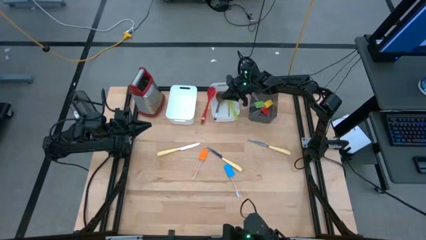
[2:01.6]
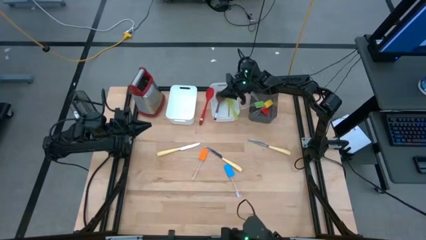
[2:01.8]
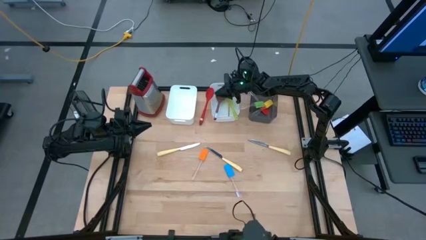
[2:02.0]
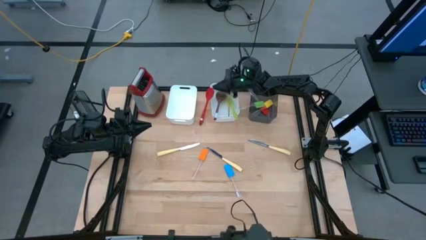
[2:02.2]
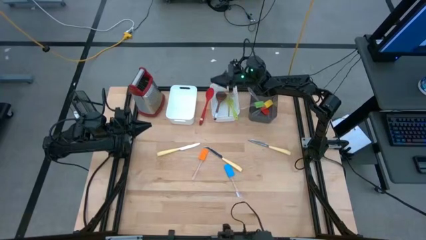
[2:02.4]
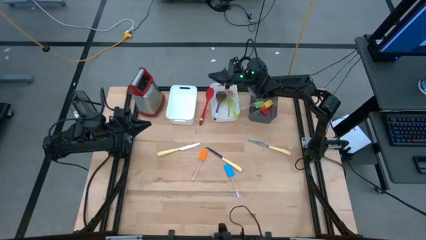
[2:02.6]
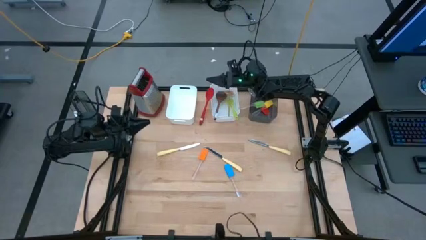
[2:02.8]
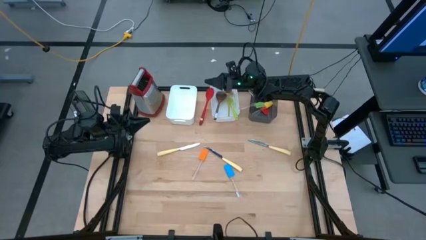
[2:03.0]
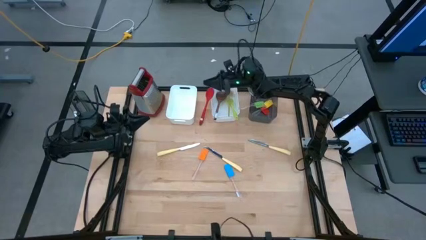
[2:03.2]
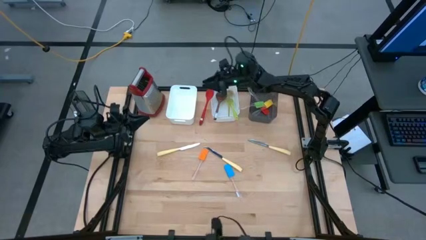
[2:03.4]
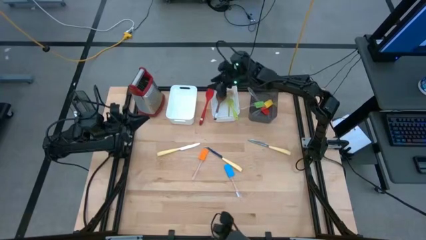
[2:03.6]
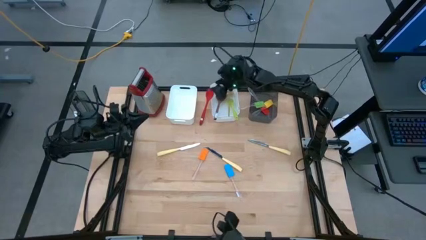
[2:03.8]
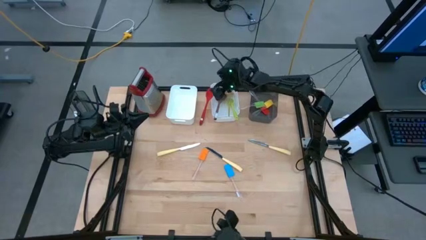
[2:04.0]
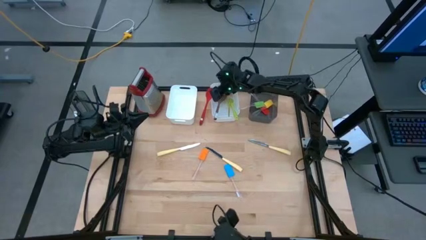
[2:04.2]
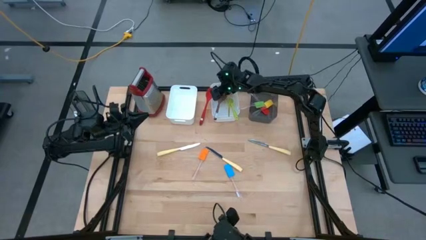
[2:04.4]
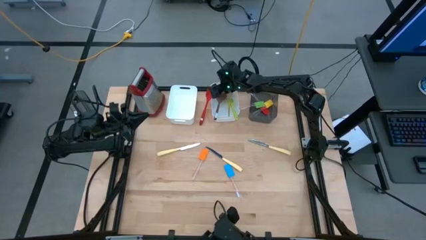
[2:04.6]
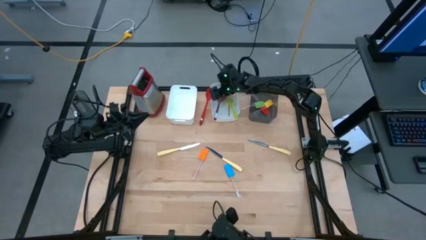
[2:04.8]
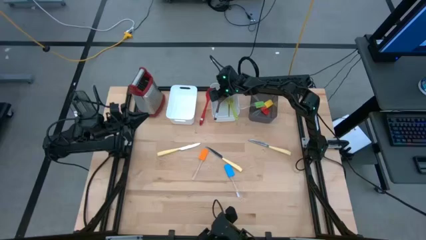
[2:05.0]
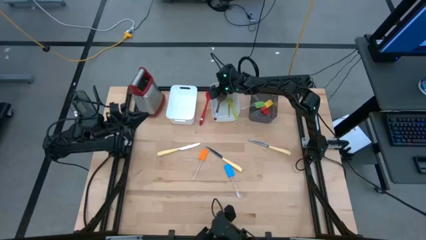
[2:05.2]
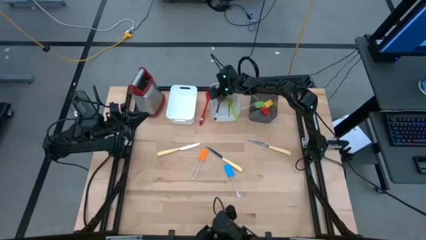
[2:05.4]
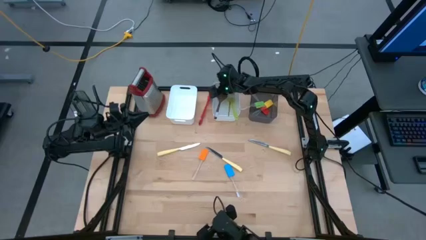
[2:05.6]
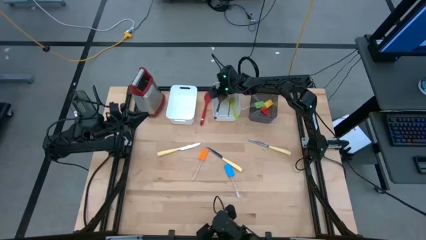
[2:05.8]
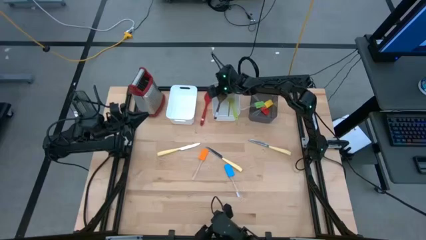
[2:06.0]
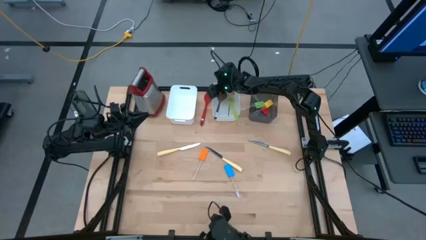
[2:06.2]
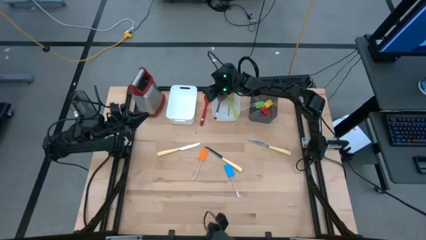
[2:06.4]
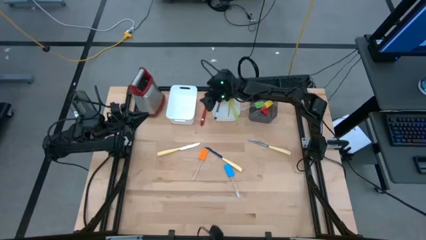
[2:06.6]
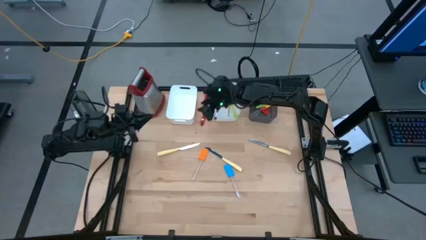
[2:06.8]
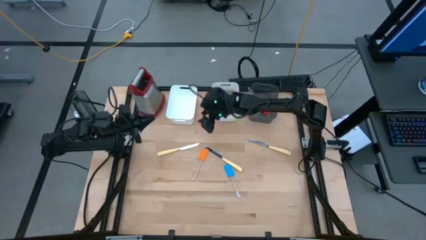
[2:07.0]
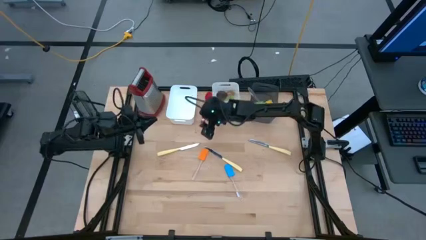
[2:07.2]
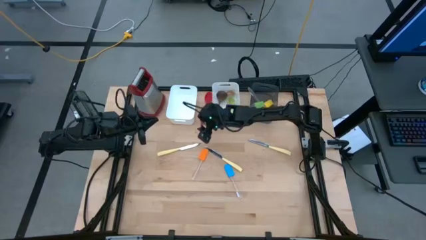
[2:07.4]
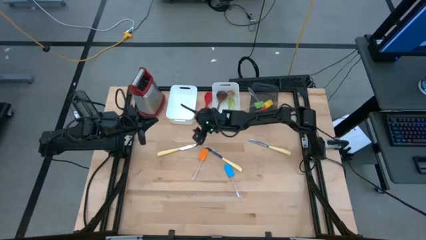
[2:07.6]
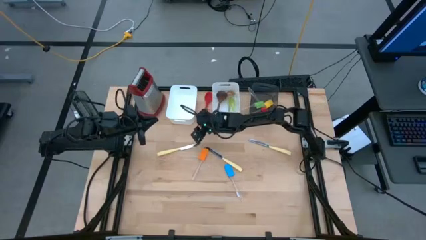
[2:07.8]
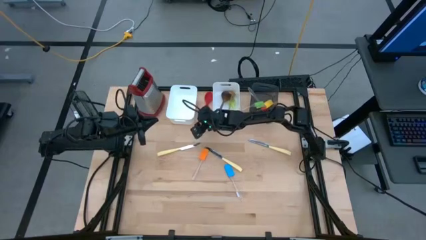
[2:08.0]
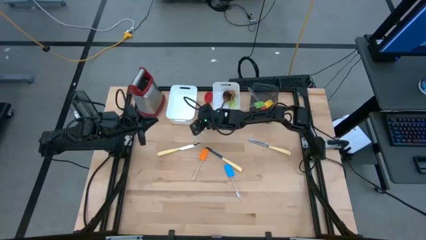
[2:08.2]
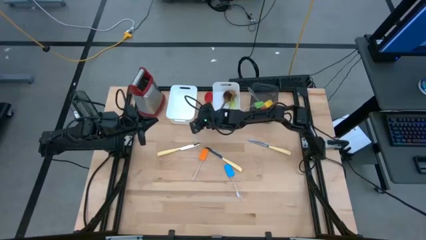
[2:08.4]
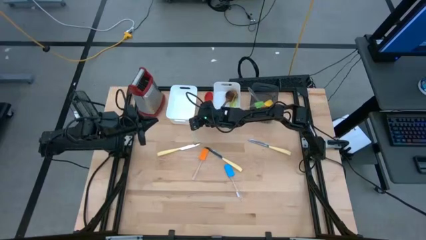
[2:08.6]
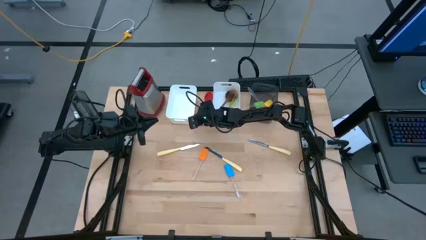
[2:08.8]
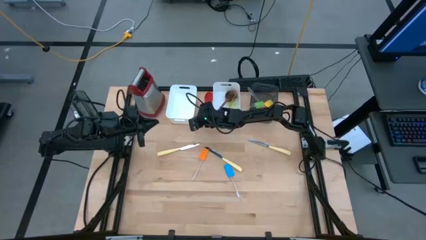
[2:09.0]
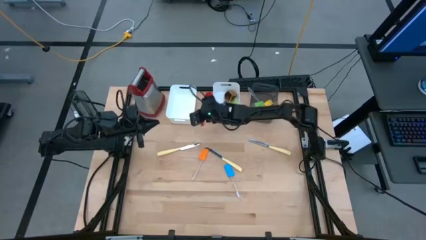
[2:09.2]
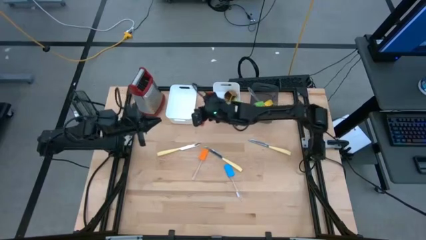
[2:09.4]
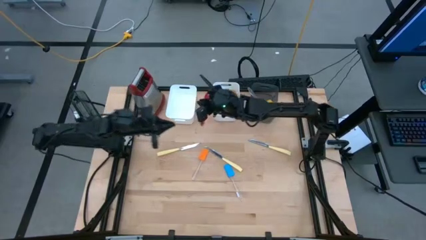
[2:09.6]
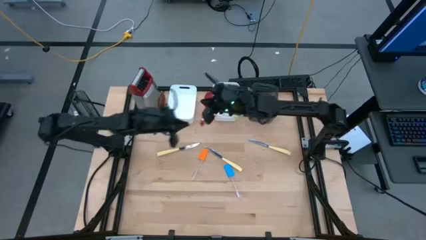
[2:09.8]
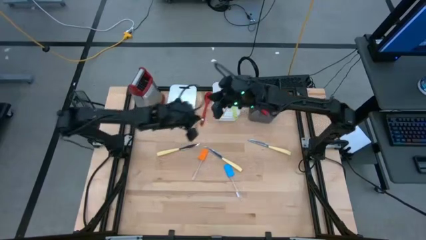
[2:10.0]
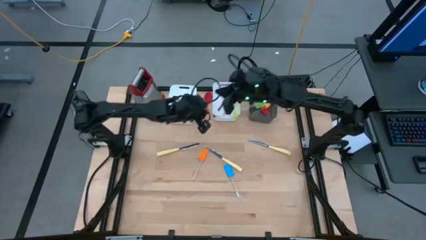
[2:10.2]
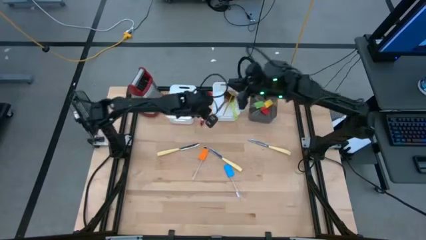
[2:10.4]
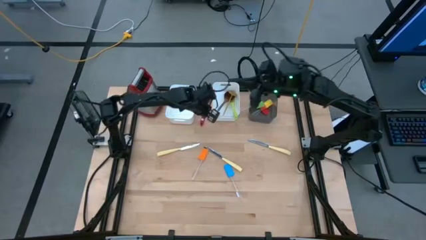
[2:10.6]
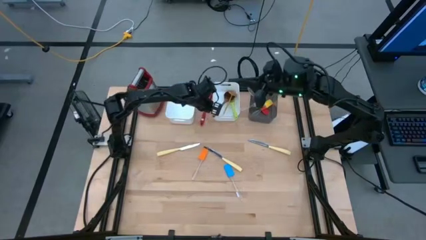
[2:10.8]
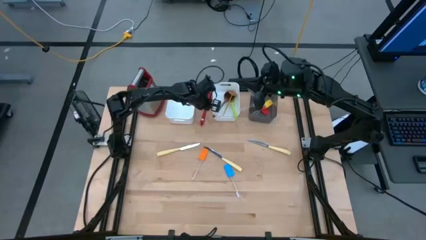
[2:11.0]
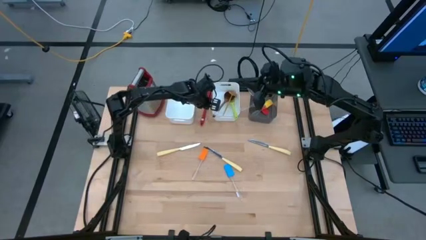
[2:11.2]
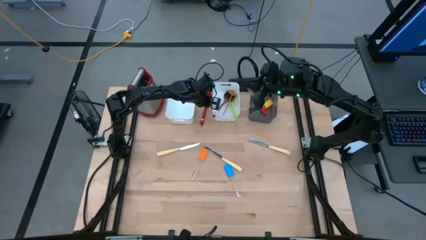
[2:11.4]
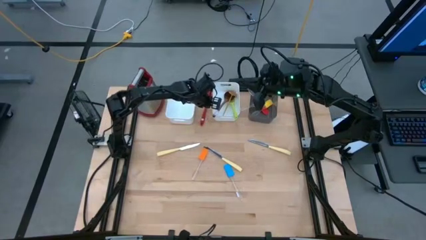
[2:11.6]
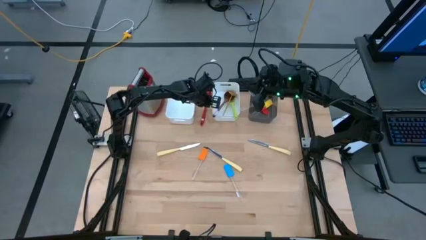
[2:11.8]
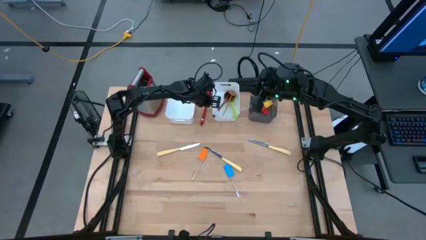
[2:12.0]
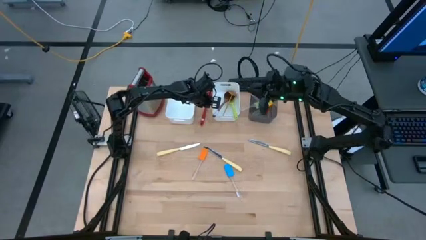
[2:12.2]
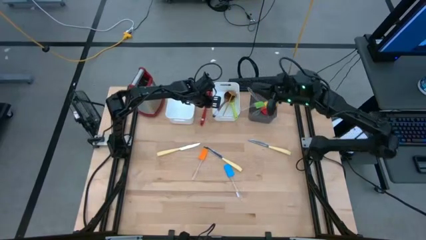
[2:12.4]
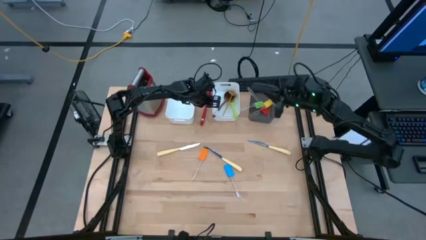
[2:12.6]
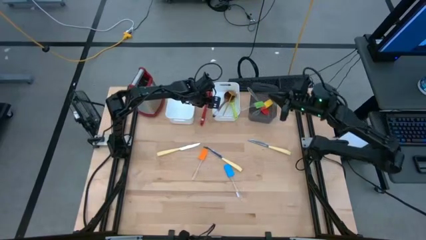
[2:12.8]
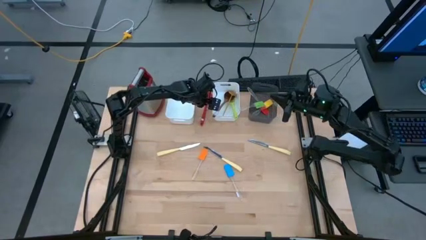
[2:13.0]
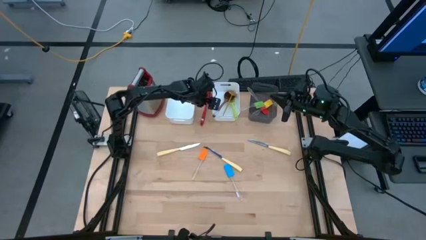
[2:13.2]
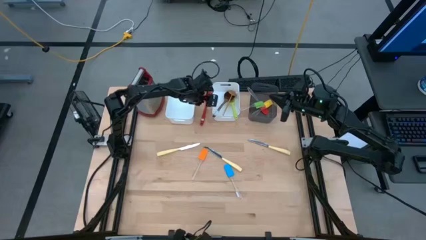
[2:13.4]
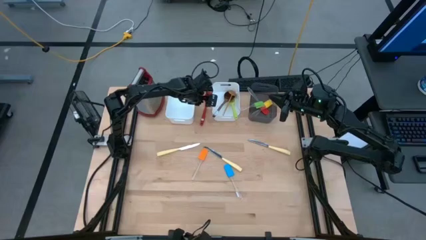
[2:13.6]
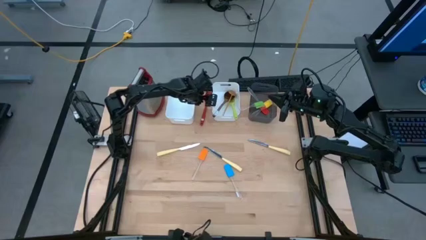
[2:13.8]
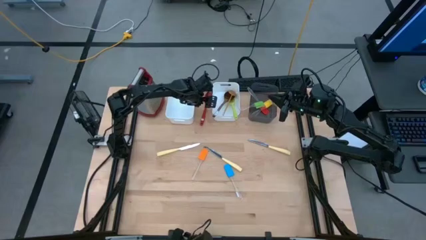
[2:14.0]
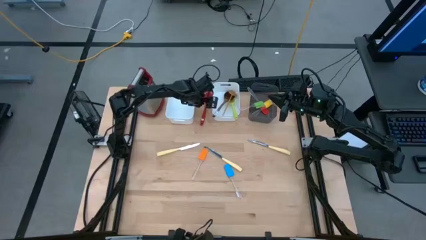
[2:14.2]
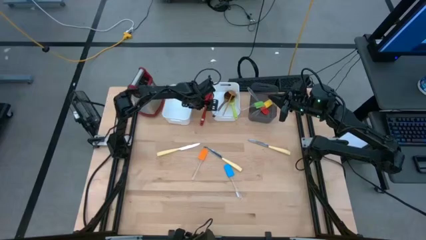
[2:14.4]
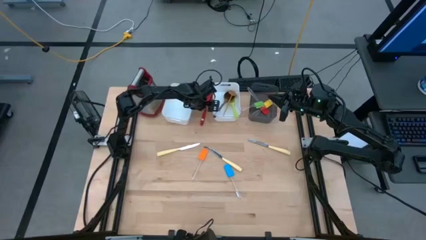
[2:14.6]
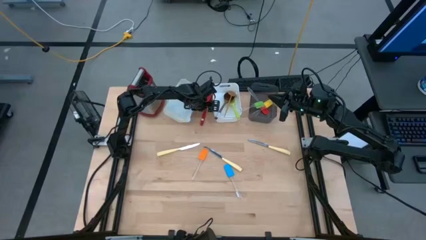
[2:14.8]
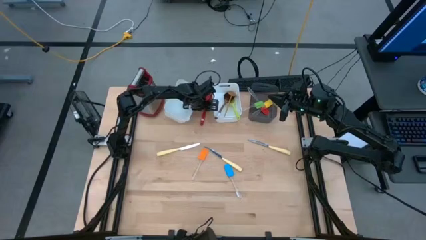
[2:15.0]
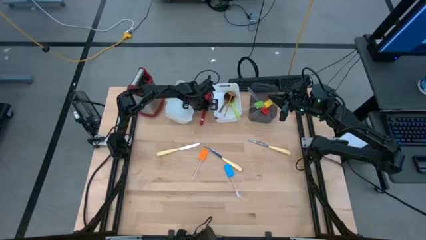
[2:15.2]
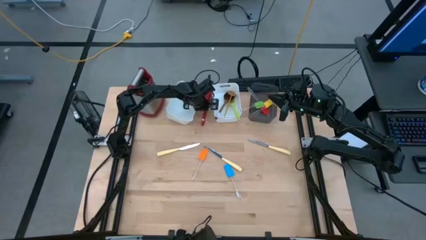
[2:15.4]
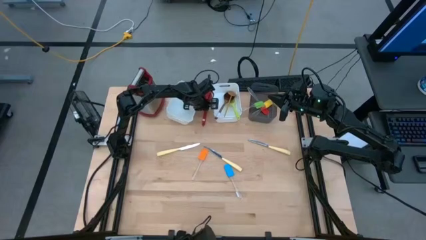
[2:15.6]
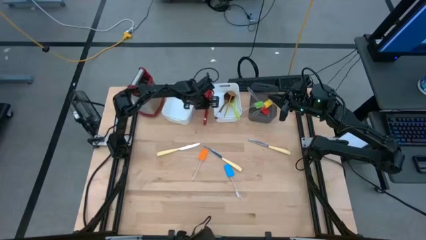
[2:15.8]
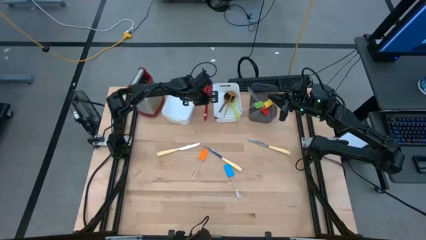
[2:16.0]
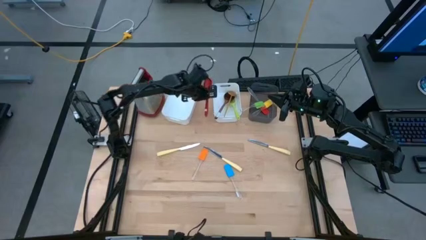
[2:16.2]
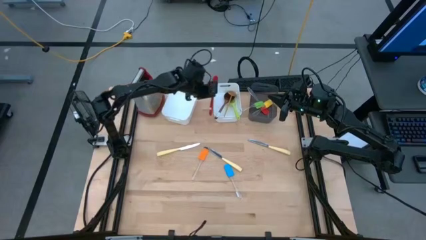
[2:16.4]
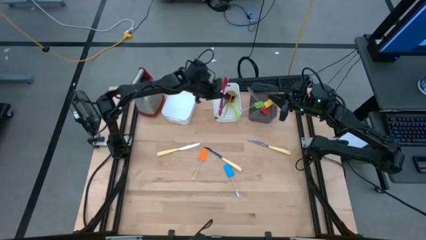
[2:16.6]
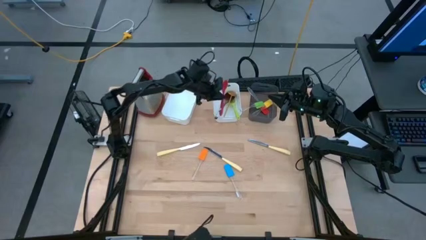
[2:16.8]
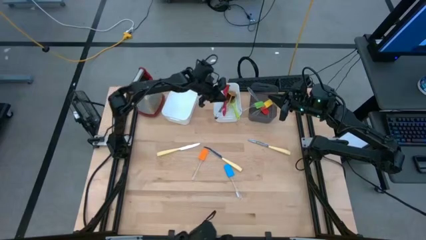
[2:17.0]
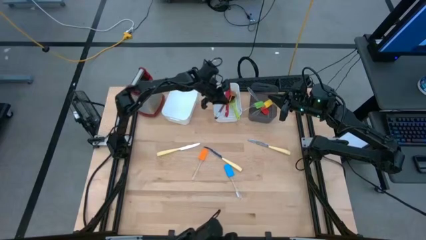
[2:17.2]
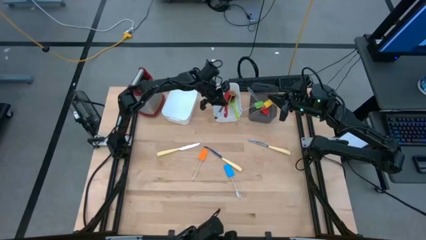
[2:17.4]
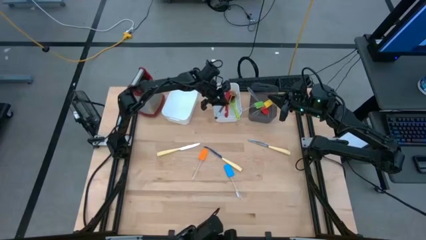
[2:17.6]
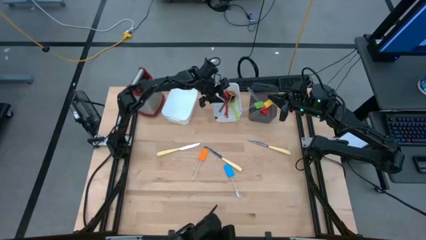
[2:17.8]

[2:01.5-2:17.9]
Task: Pick & Place Kitchen Items
Put the red serving spoon into the right white bin
